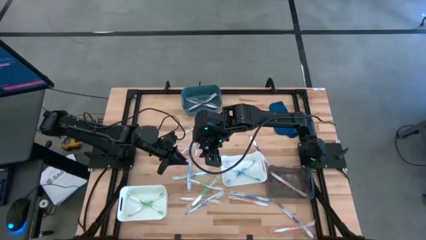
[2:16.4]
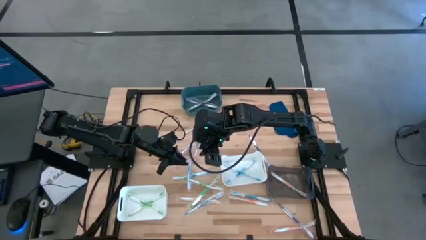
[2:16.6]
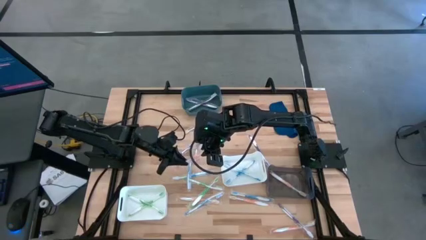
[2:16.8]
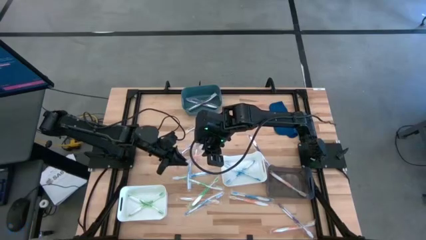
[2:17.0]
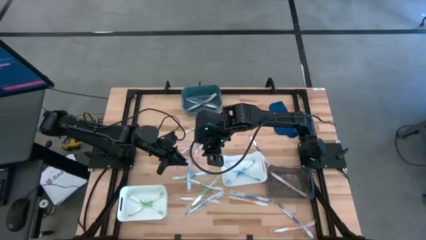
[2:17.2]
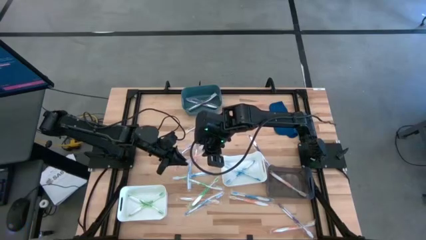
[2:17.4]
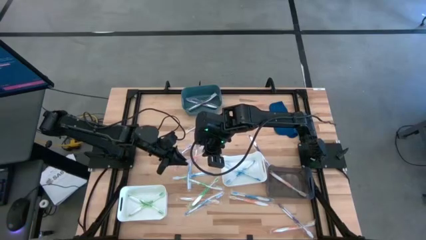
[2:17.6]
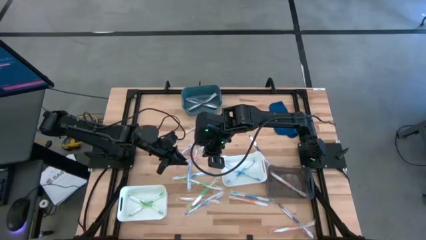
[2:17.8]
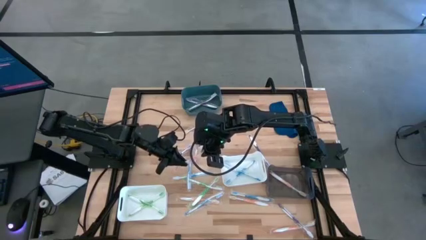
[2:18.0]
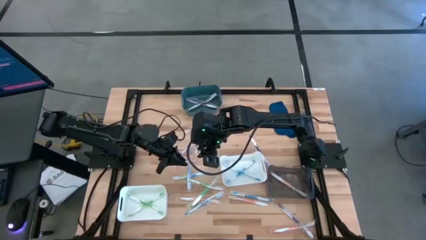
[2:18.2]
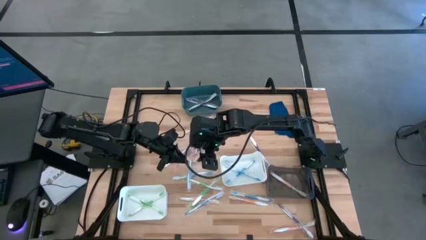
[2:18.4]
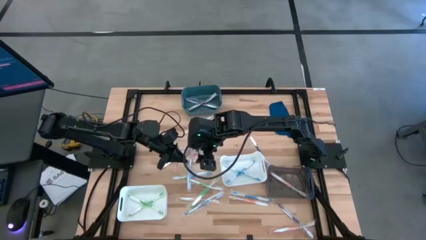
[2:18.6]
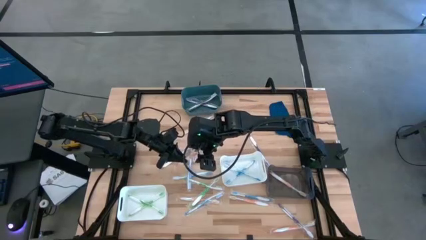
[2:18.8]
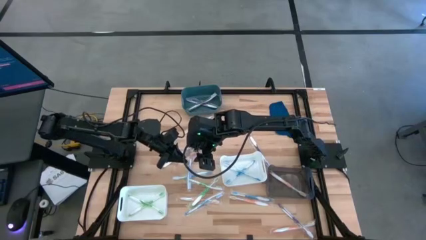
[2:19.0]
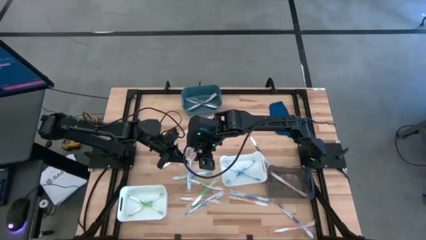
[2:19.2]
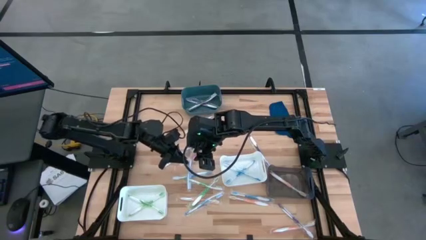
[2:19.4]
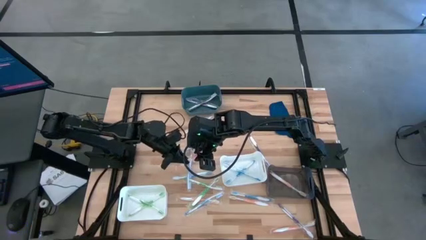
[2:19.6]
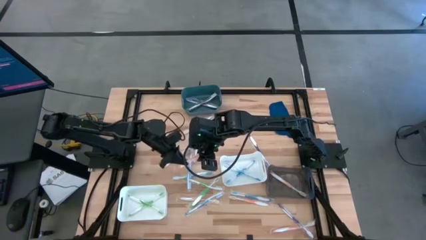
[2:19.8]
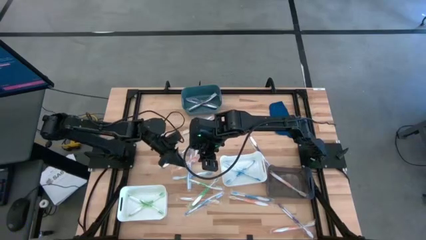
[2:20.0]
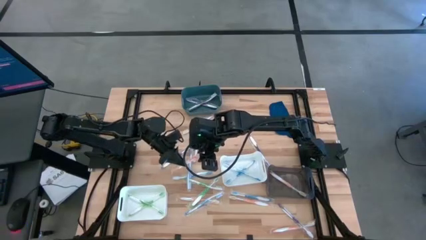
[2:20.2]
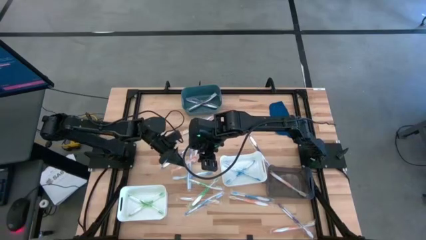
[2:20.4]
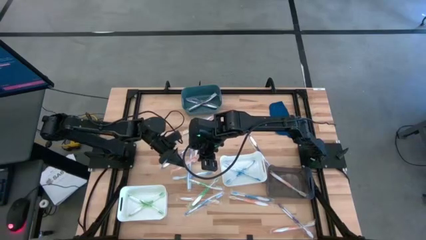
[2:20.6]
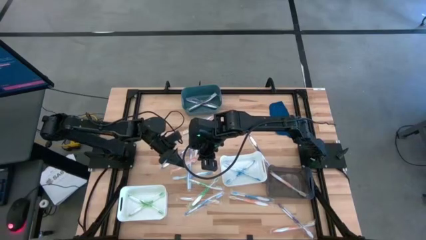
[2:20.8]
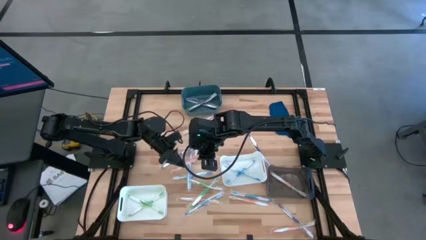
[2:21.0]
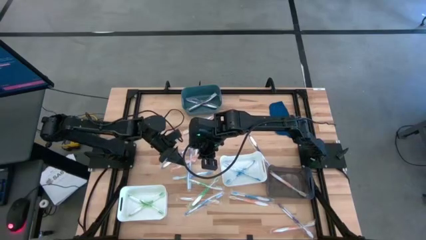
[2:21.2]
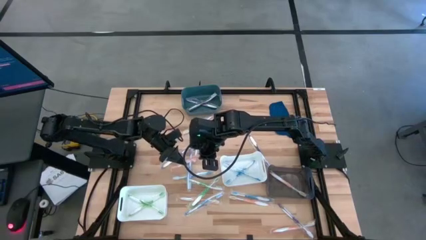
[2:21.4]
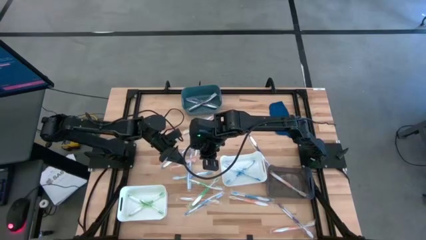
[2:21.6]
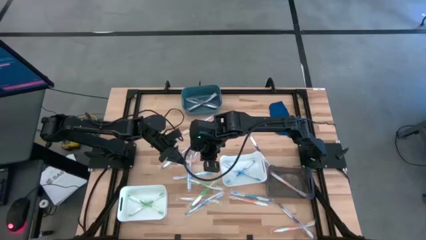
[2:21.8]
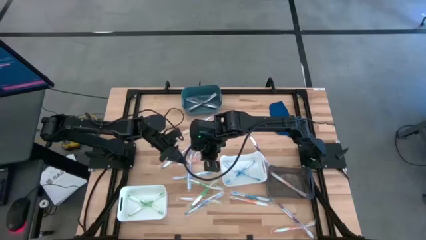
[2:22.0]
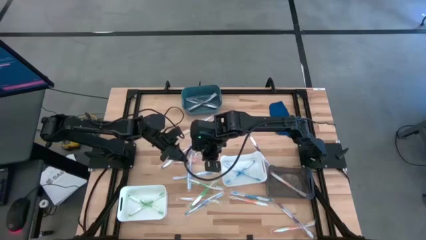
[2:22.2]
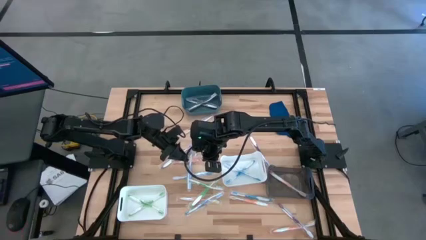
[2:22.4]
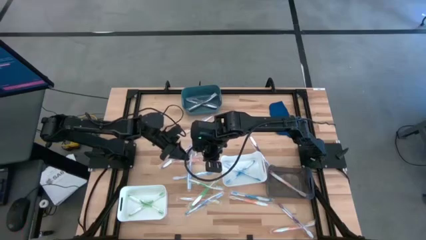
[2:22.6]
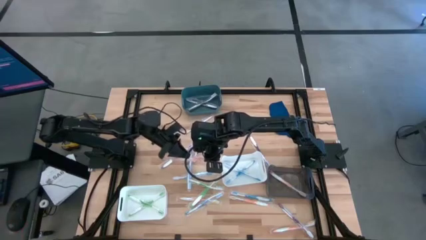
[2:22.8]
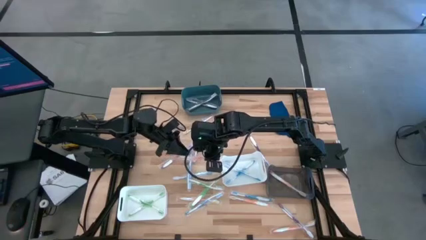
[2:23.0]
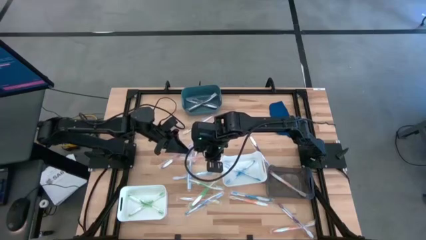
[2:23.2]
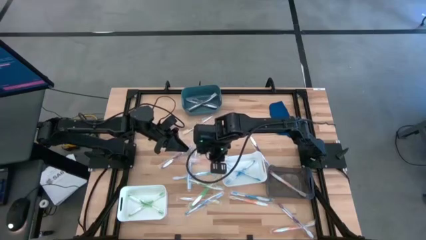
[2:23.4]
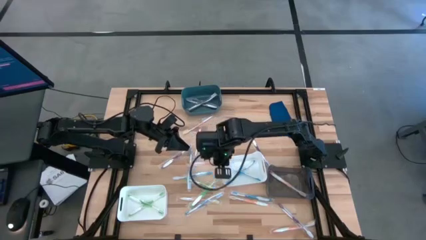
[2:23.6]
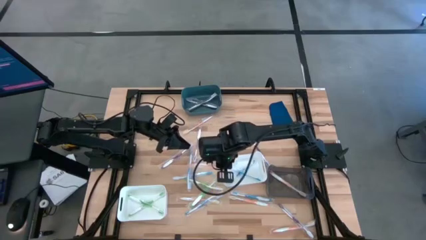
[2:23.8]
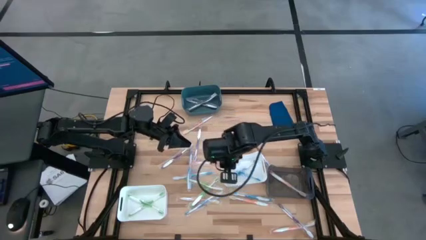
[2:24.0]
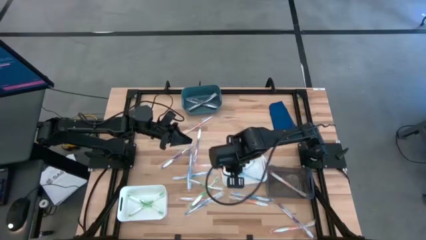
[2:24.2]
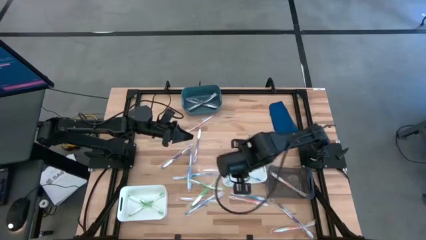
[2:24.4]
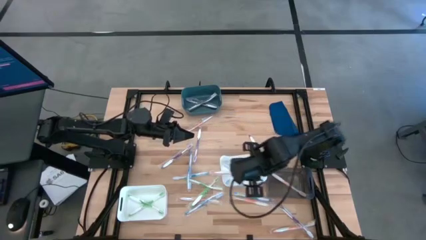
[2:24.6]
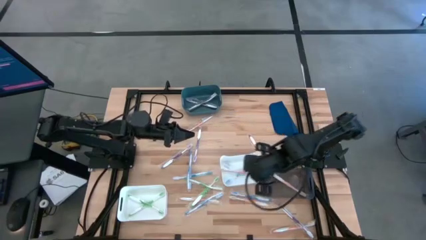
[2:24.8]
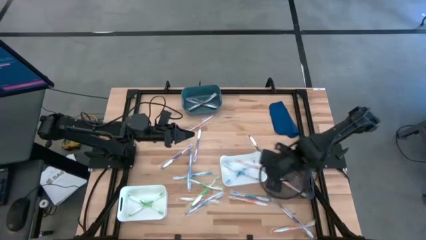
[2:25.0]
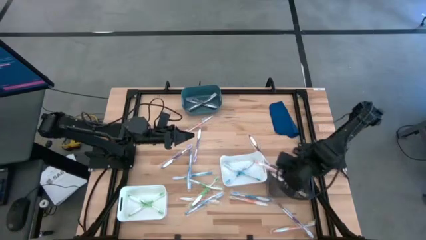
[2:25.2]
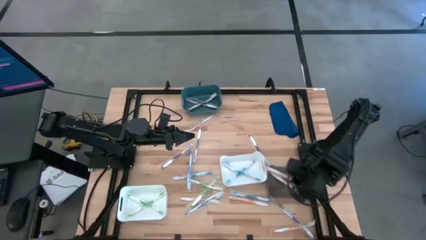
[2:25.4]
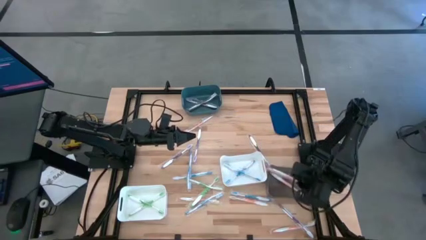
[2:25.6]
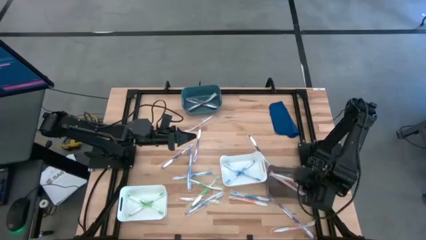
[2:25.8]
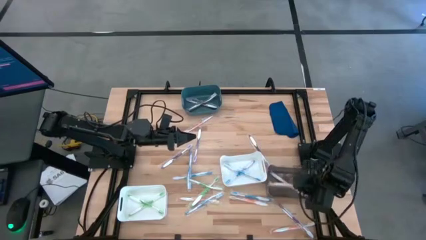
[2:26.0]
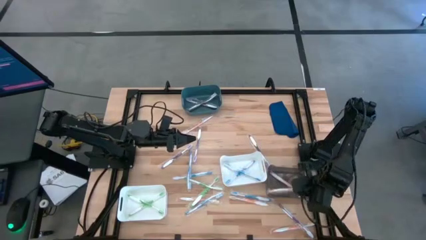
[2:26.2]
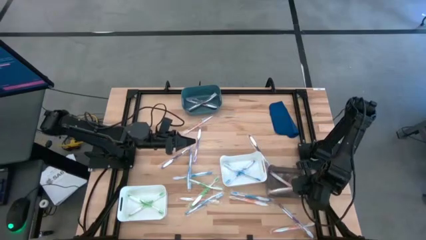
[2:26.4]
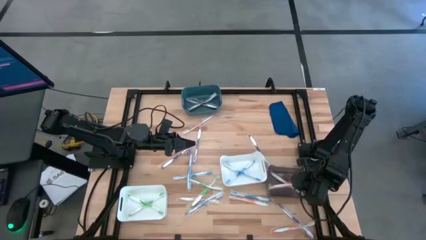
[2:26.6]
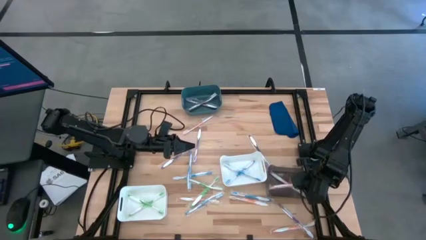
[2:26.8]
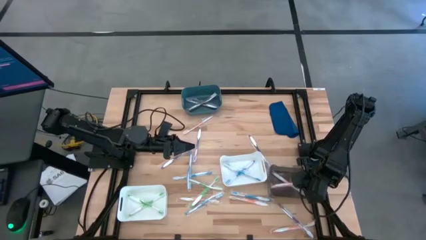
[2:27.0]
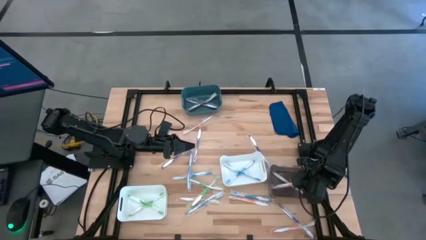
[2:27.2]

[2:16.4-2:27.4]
Task: Pick & Place Toothbrushes
Put the orange toothbrush into the black bin

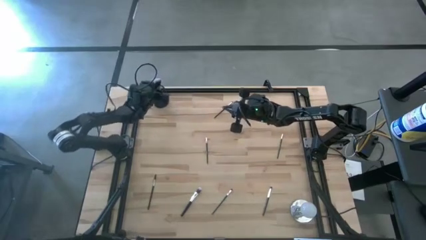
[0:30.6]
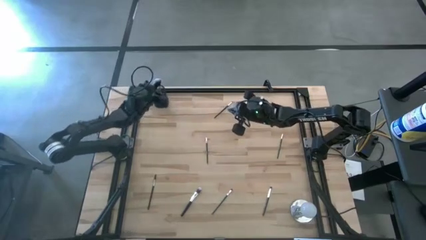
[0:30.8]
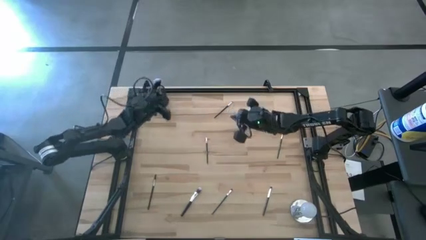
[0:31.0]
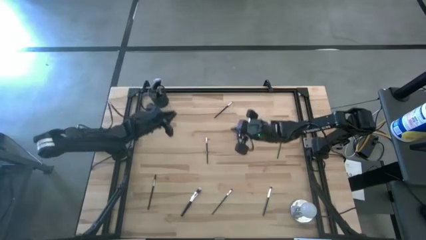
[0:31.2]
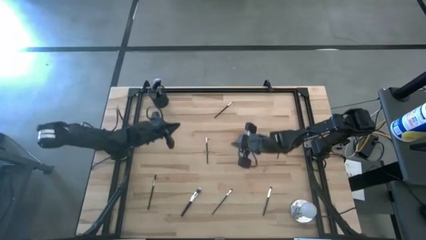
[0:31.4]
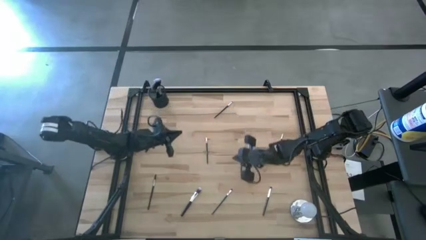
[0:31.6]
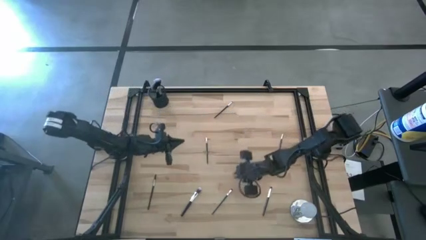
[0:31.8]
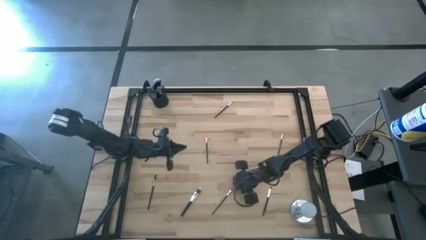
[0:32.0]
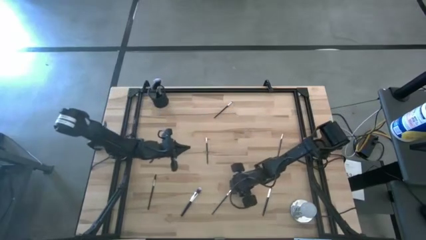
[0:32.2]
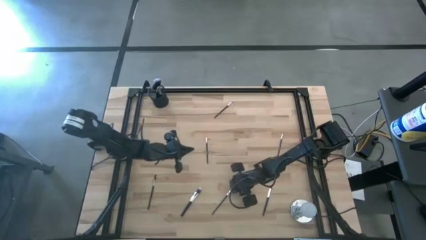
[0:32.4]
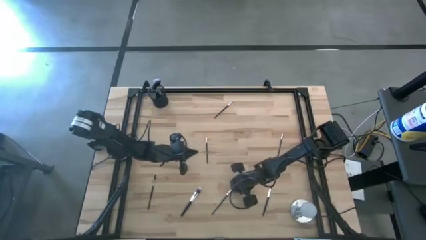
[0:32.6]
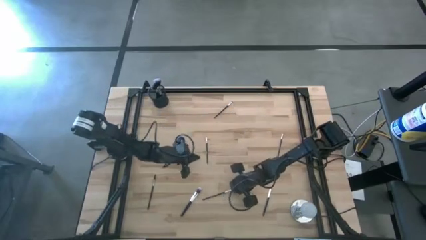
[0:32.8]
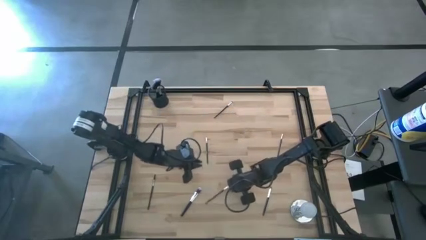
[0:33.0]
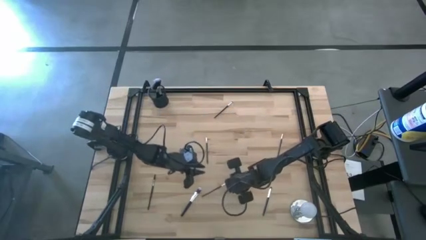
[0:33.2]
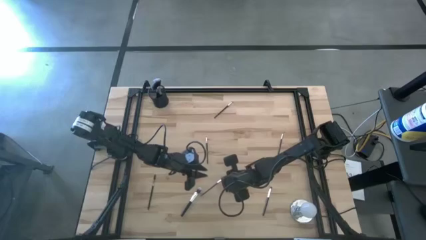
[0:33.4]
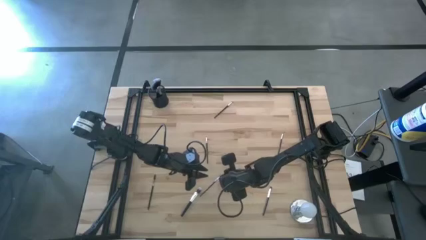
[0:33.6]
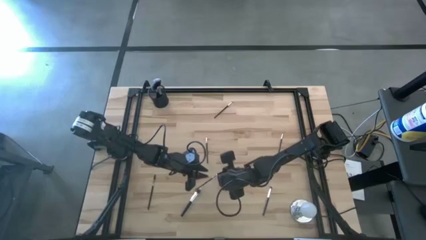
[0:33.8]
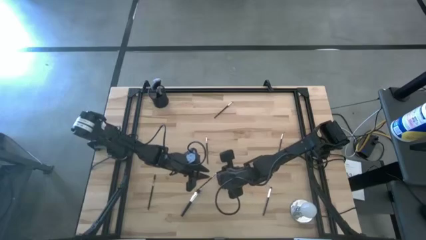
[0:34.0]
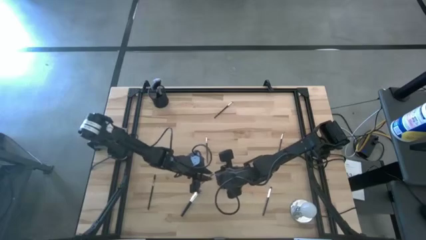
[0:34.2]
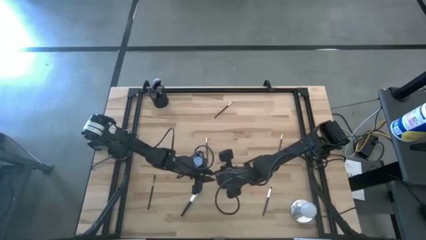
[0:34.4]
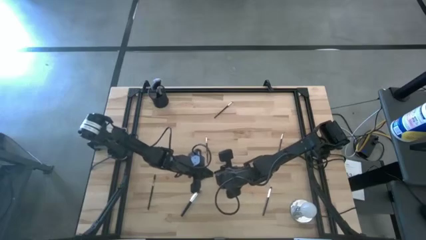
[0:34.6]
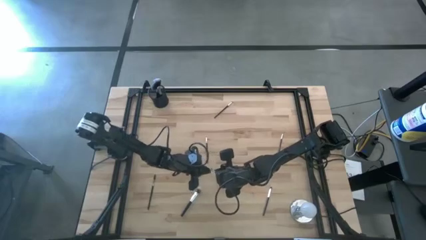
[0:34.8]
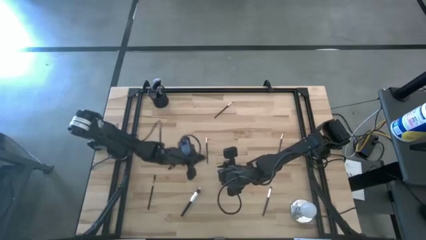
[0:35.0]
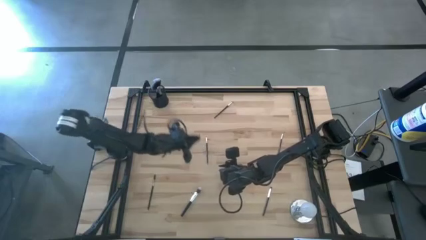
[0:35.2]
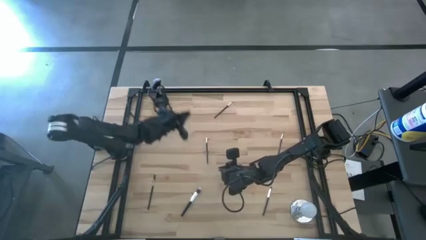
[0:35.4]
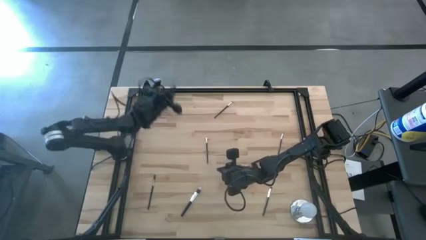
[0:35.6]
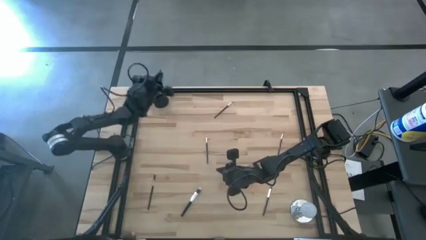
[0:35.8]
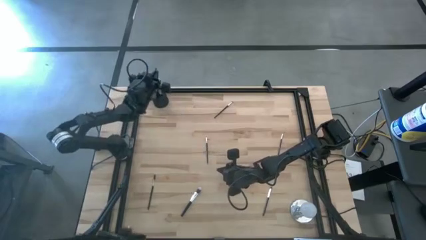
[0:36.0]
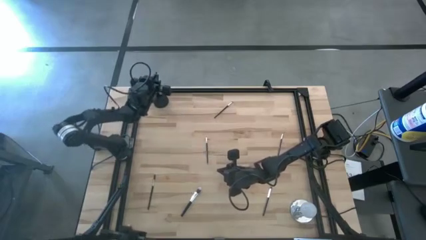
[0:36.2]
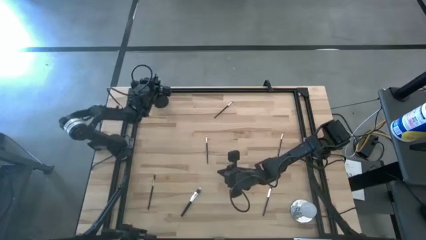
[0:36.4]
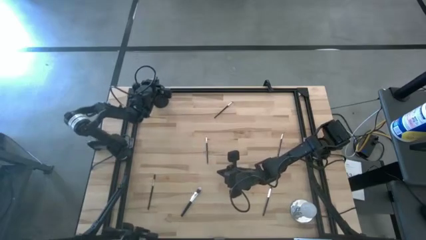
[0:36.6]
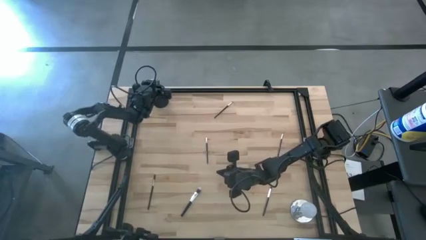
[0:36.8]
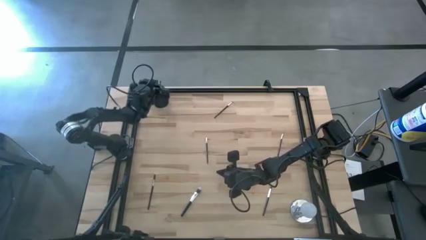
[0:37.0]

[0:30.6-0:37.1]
Task: Put items in baskets/containers
Put the eyeshadow brush into the holder
